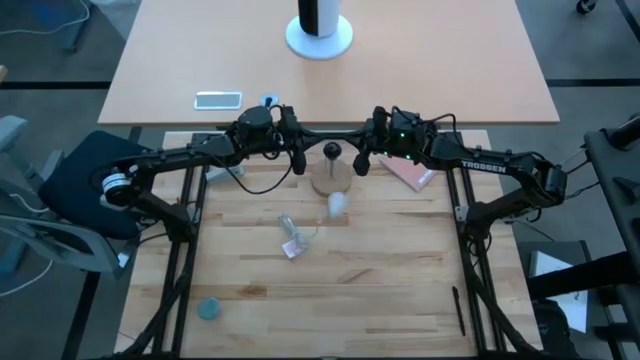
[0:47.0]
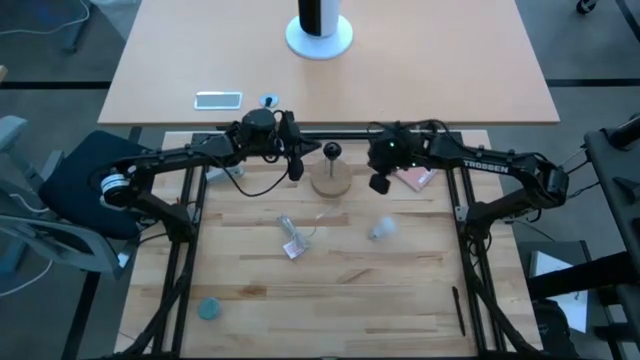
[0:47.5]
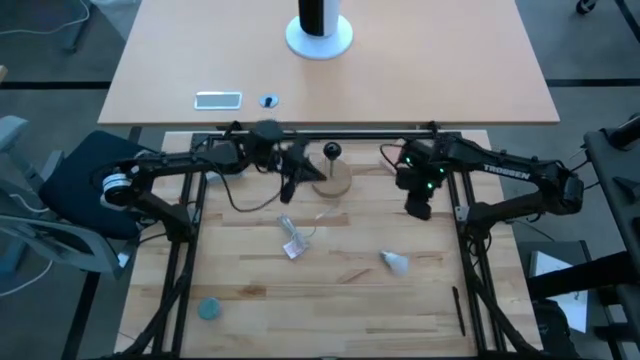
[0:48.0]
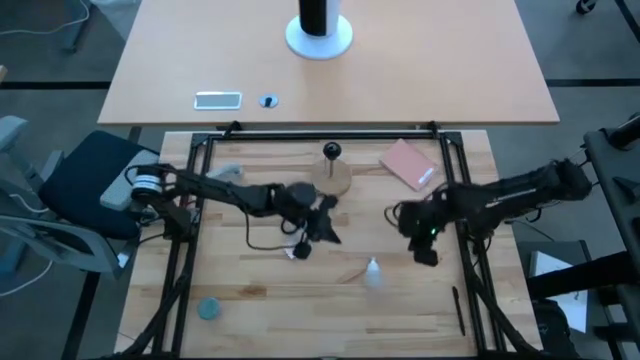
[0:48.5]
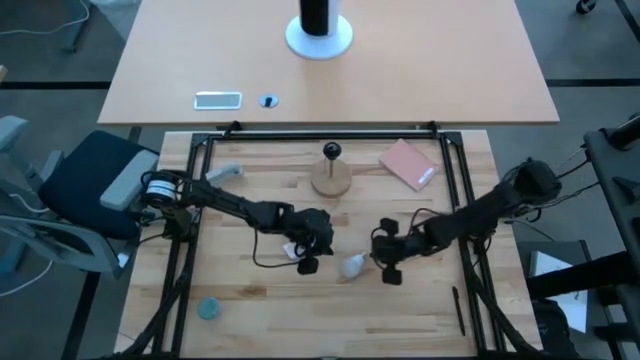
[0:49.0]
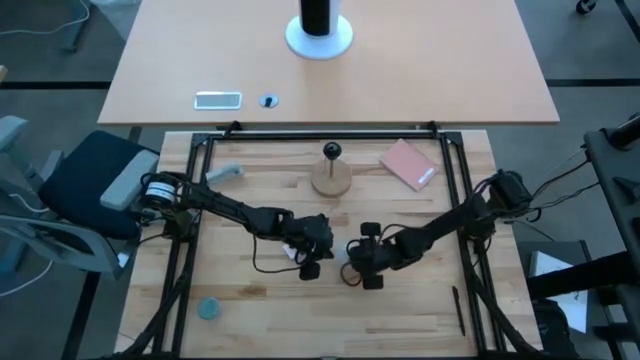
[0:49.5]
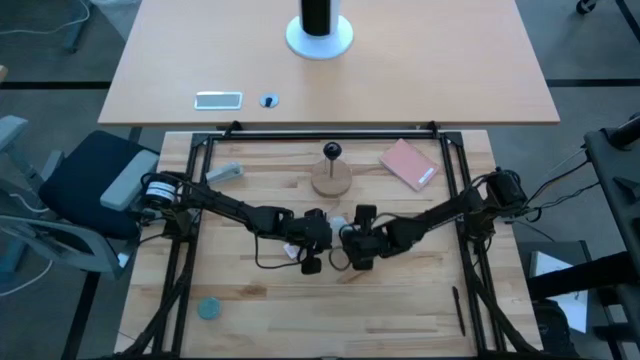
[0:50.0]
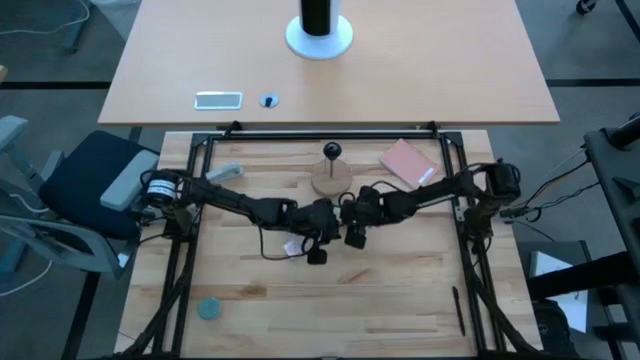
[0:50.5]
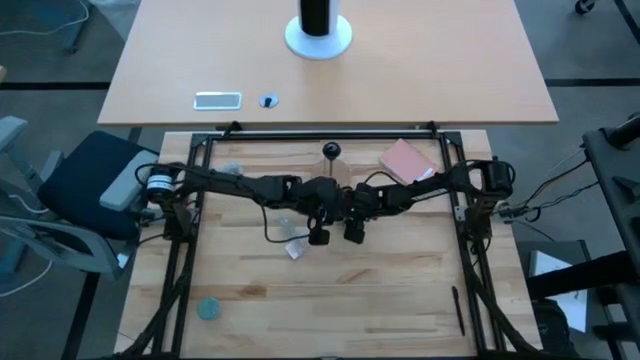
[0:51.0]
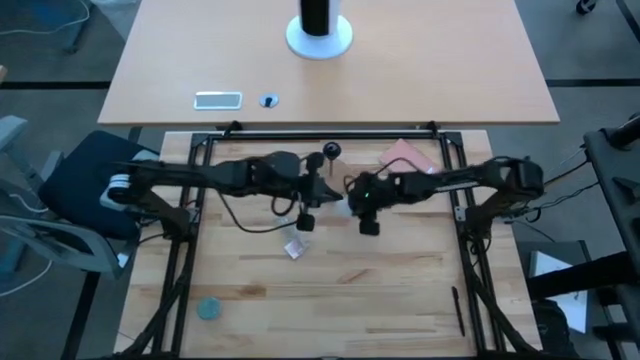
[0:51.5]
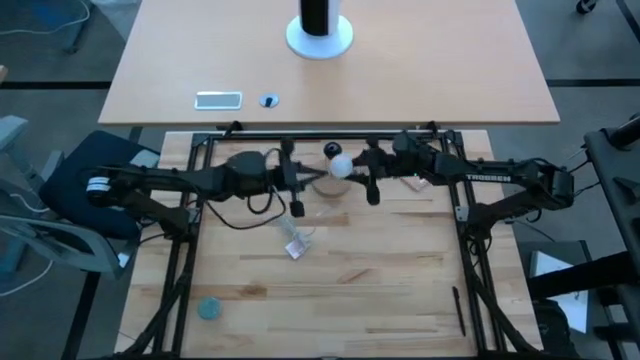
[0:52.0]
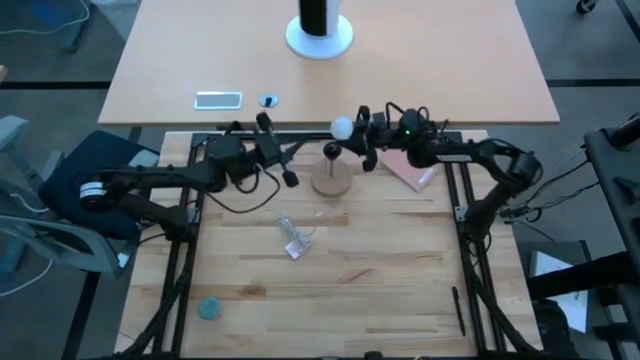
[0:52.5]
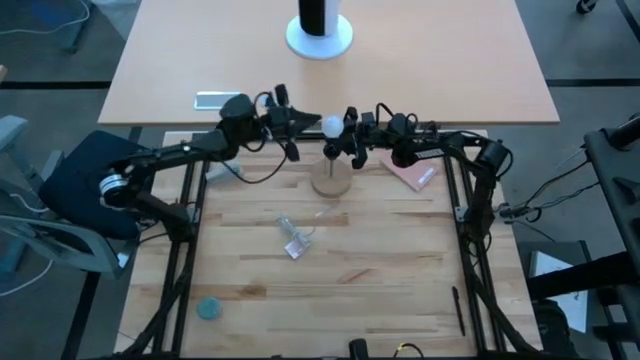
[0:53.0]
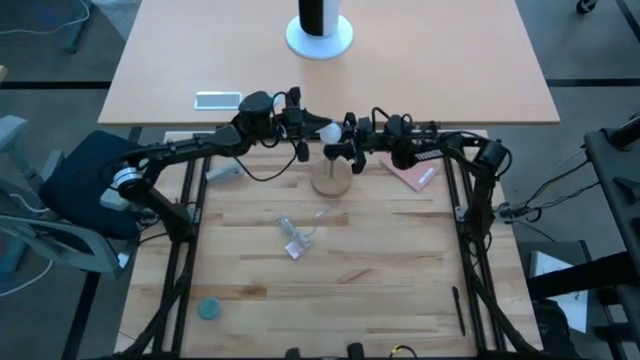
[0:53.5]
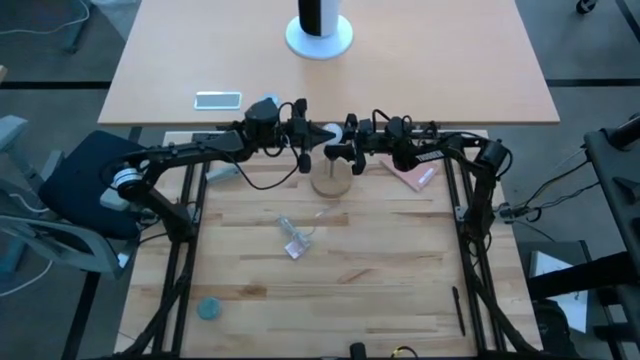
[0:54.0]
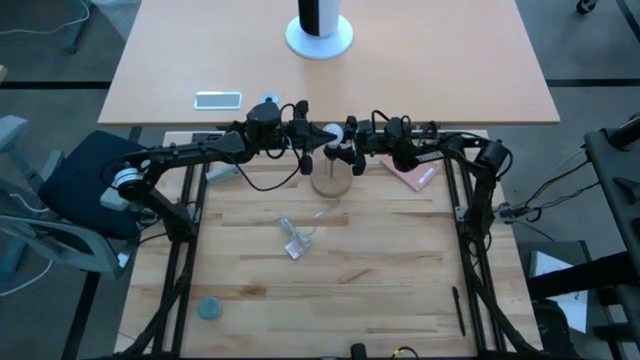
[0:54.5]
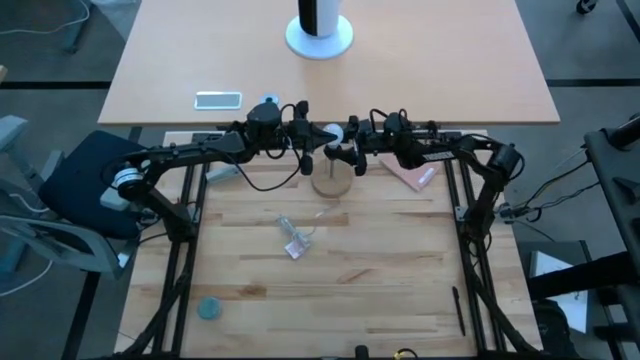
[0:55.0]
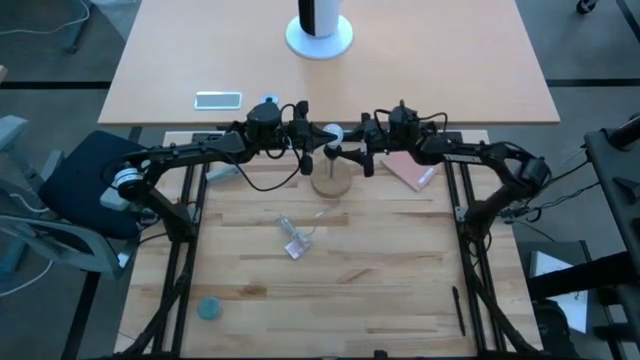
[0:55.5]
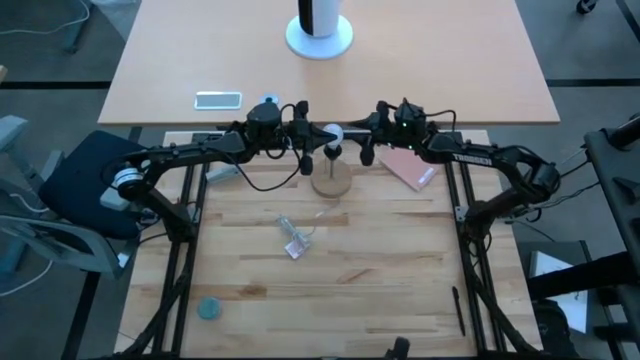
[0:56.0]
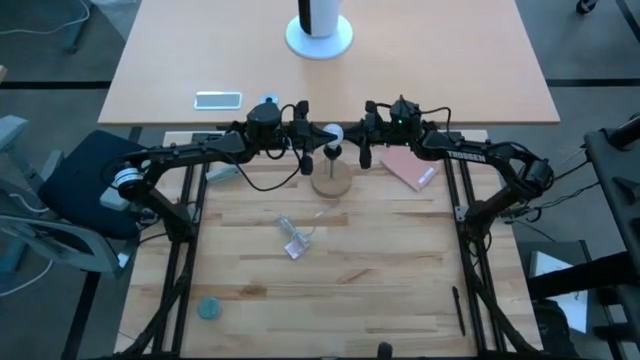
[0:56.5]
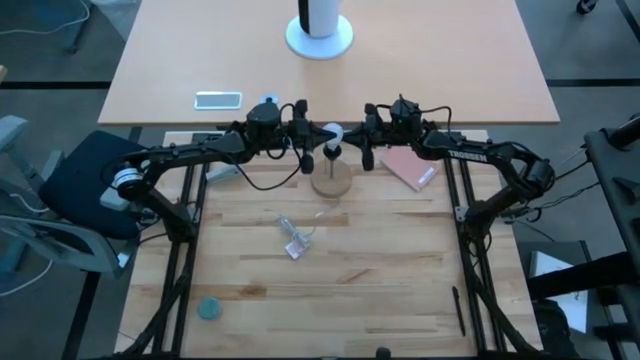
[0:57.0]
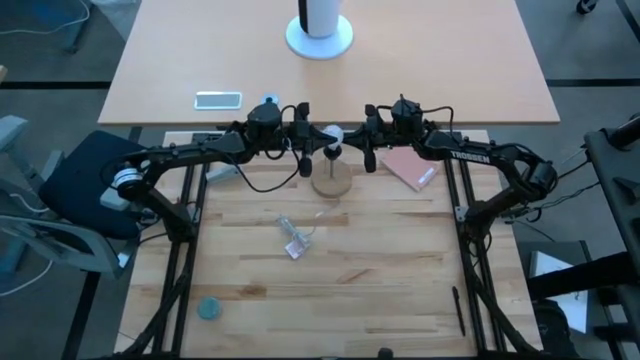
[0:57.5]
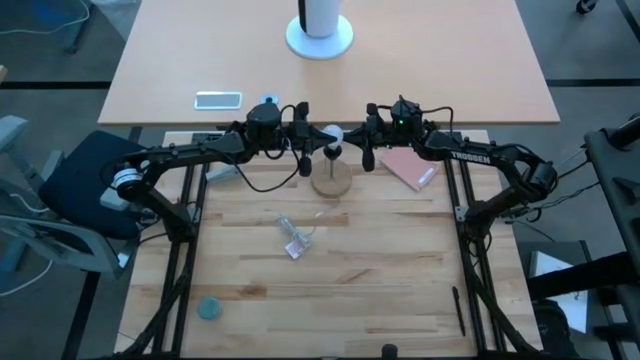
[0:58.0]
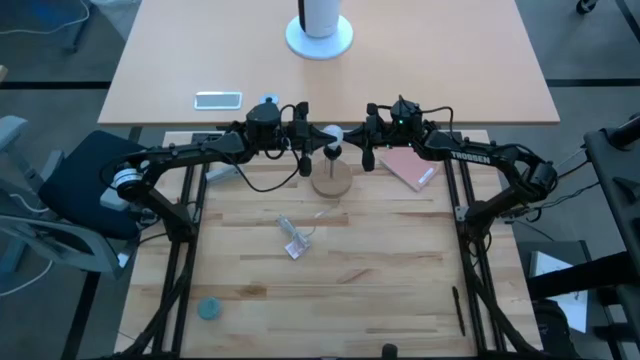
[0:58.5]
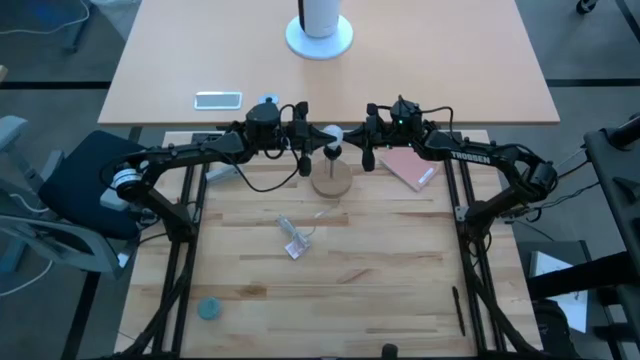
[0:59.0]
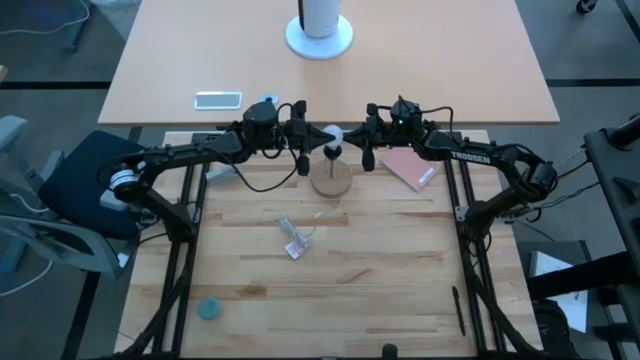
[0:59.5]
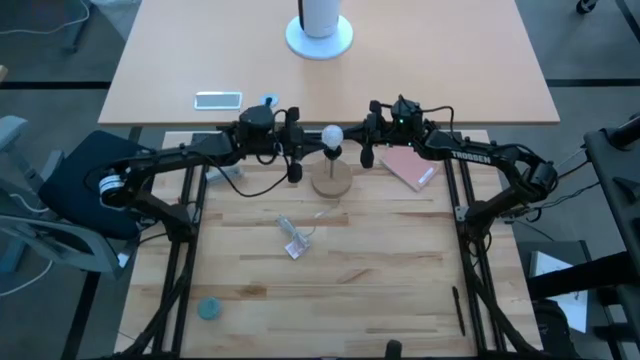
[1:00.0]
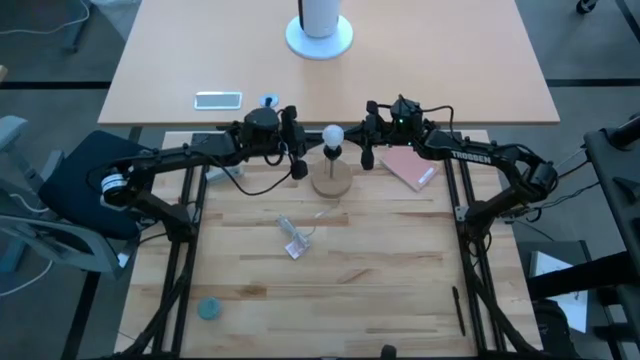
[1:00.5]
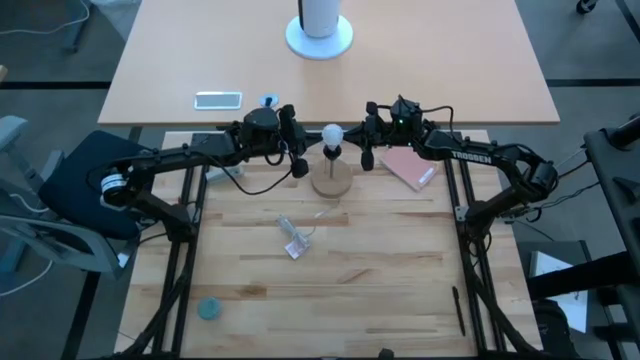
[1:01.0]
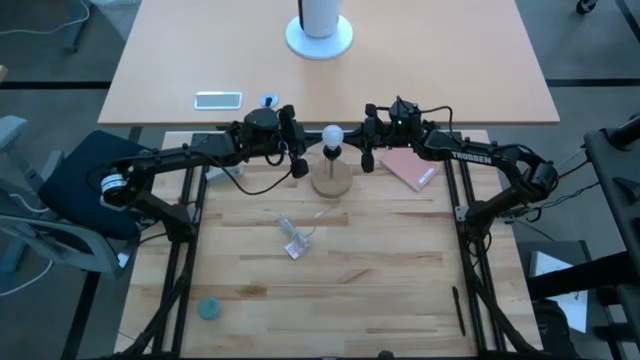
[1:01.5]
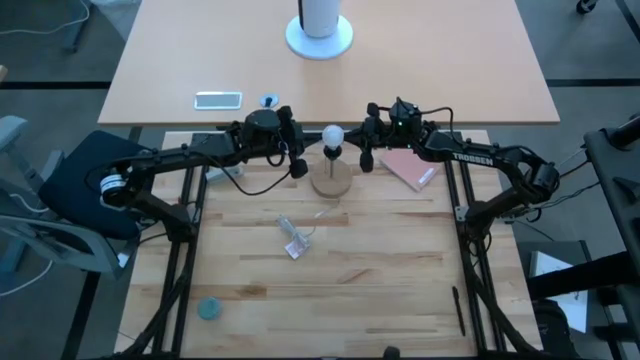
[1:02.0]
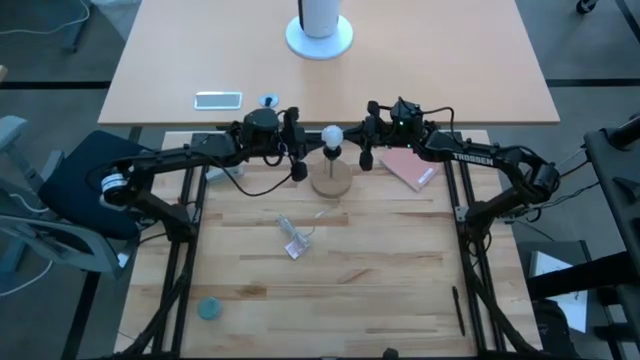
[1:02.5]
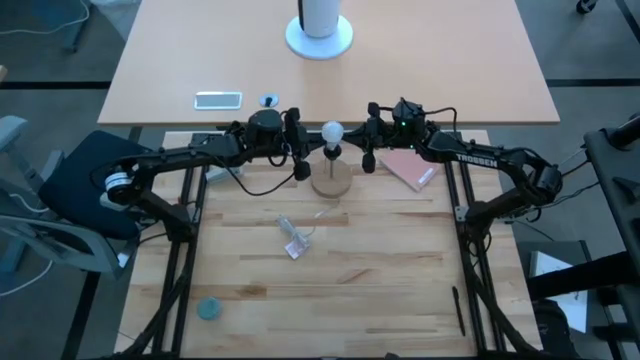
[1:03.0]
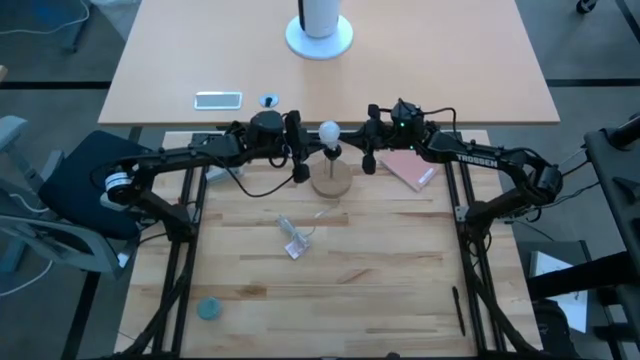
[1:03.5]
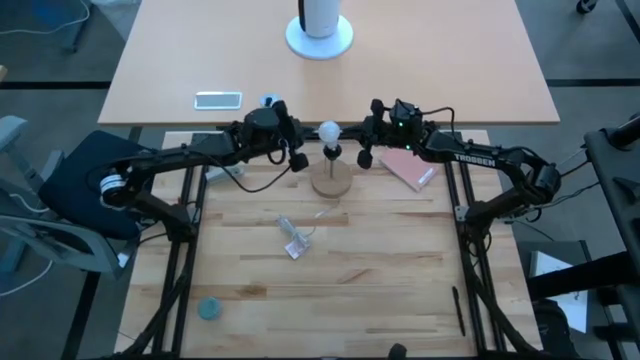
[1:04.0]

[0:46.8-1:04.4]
Task: Screw lightbulb
Insert the lightbulb on the desk lamp
